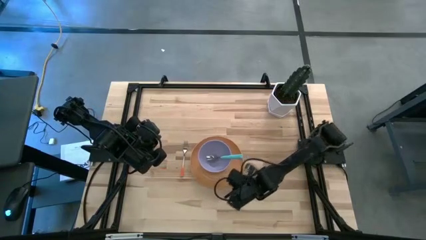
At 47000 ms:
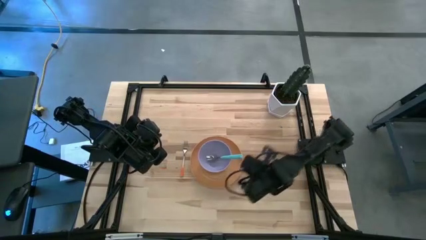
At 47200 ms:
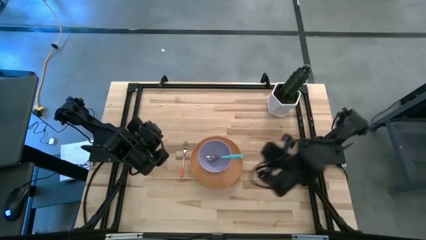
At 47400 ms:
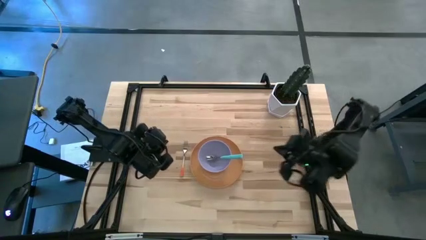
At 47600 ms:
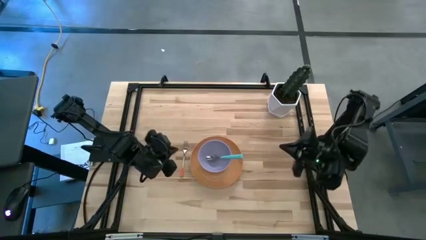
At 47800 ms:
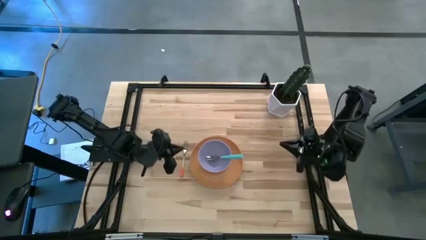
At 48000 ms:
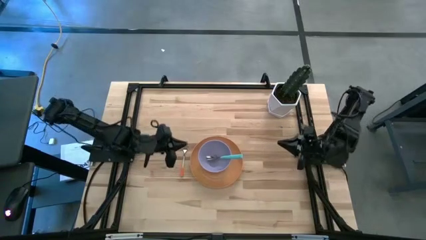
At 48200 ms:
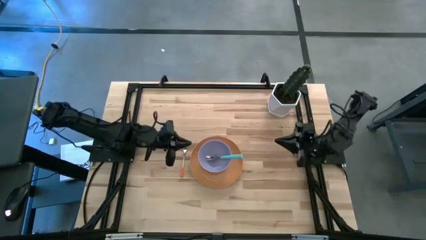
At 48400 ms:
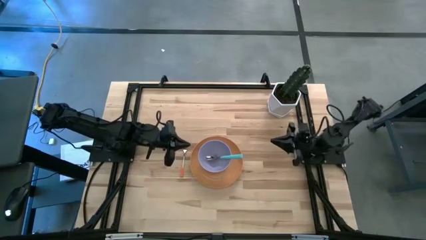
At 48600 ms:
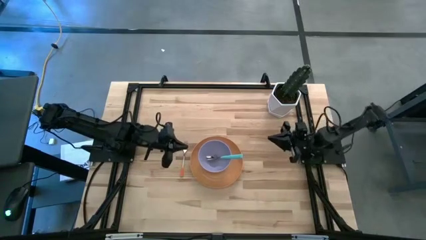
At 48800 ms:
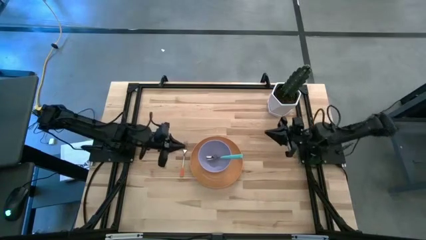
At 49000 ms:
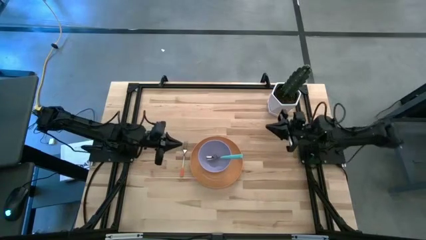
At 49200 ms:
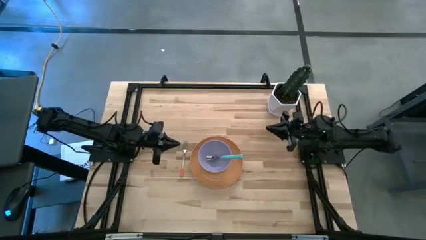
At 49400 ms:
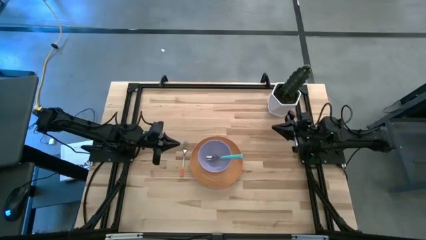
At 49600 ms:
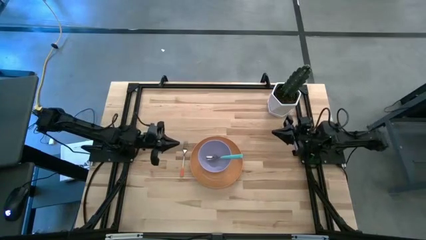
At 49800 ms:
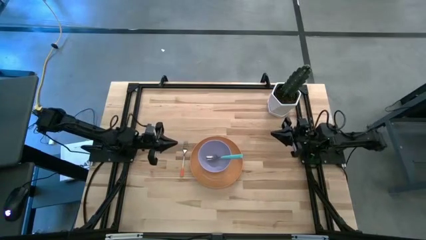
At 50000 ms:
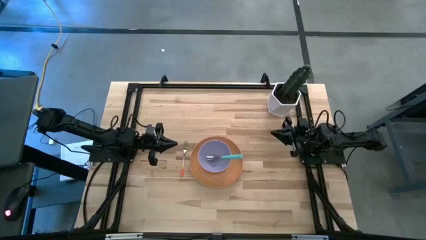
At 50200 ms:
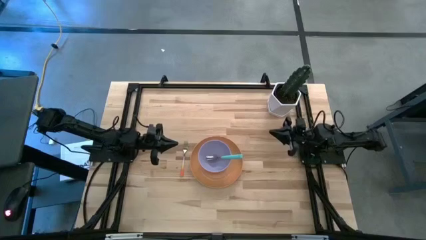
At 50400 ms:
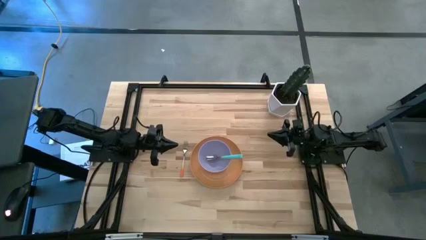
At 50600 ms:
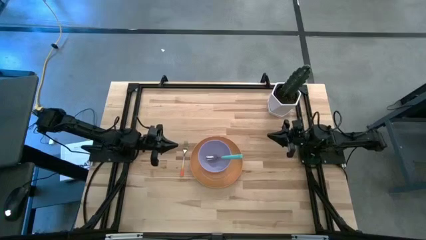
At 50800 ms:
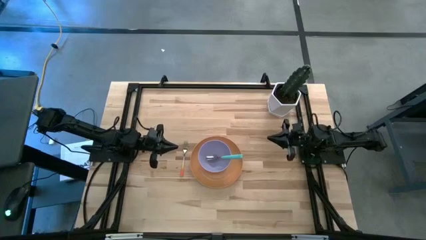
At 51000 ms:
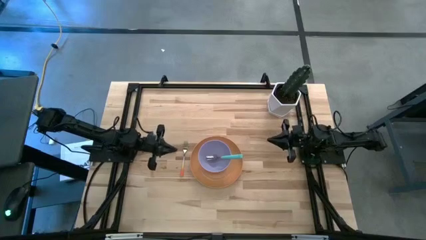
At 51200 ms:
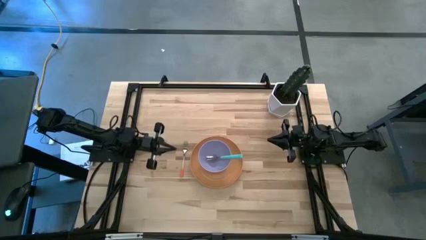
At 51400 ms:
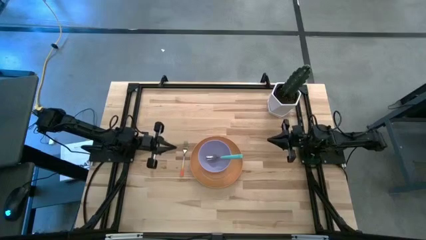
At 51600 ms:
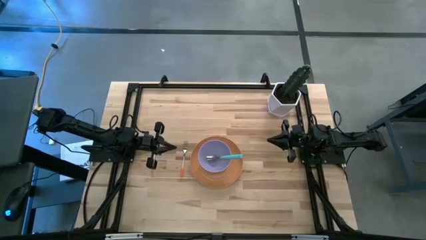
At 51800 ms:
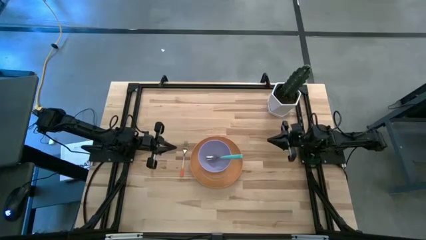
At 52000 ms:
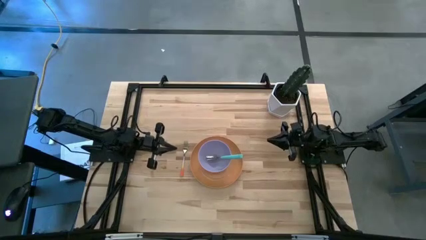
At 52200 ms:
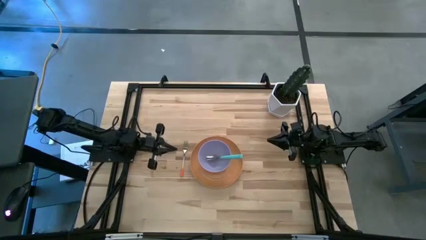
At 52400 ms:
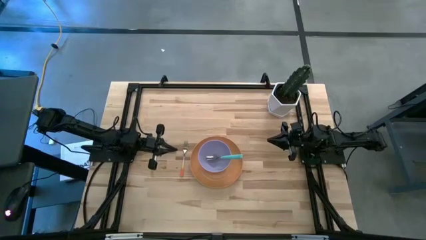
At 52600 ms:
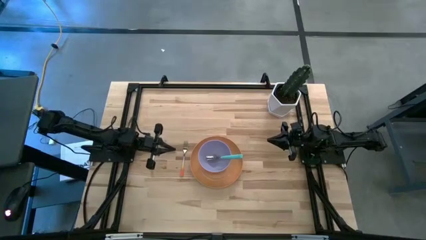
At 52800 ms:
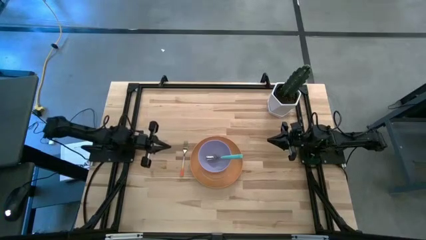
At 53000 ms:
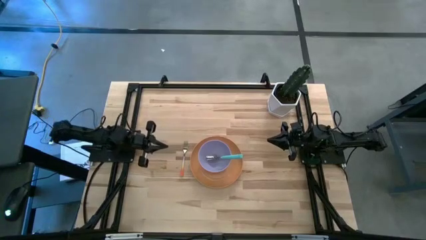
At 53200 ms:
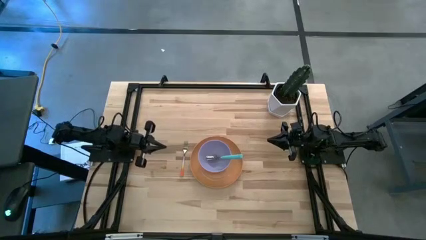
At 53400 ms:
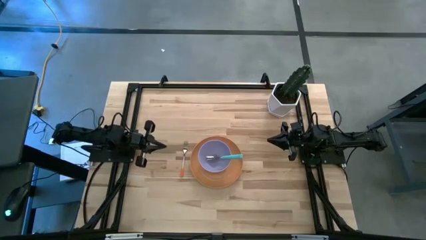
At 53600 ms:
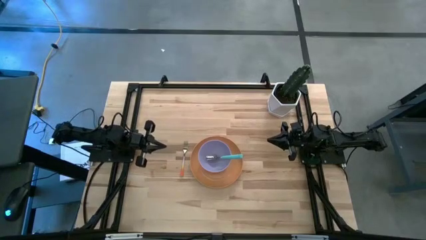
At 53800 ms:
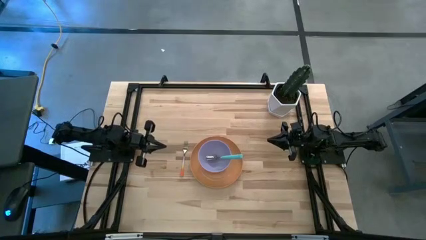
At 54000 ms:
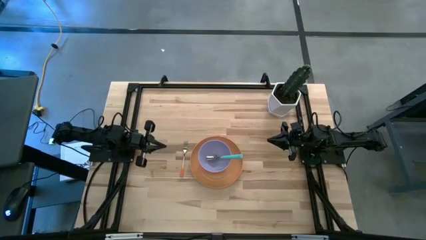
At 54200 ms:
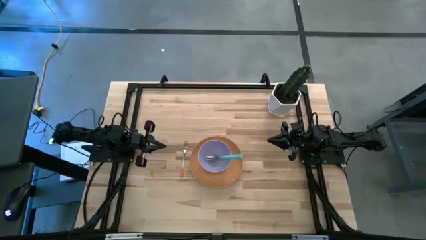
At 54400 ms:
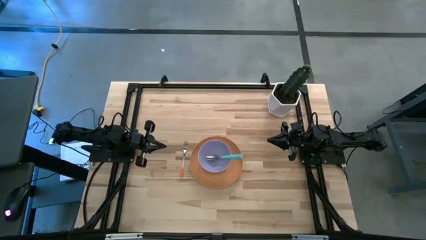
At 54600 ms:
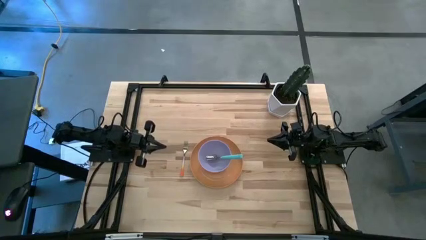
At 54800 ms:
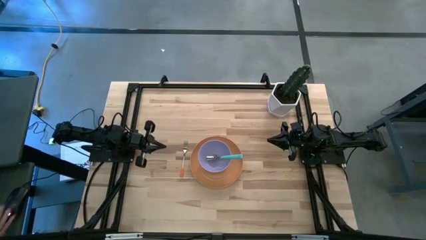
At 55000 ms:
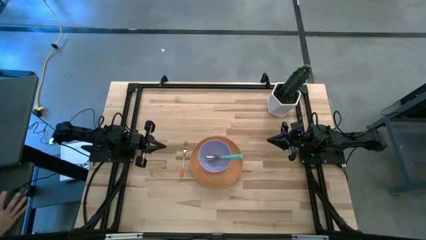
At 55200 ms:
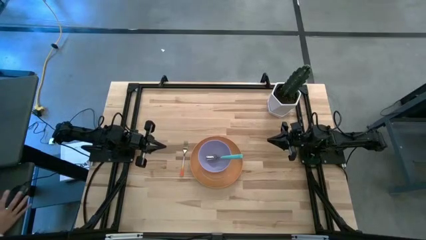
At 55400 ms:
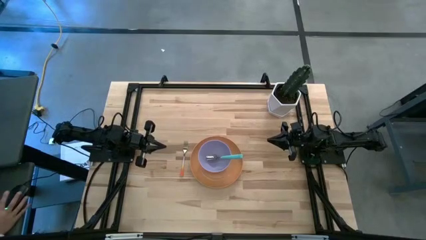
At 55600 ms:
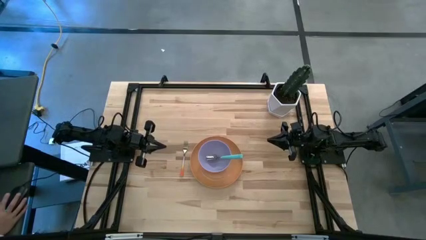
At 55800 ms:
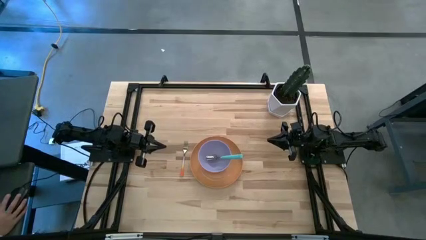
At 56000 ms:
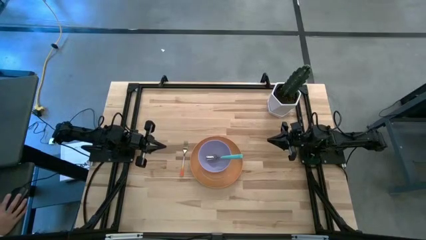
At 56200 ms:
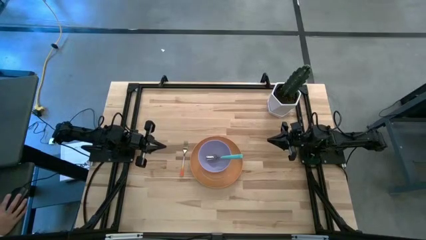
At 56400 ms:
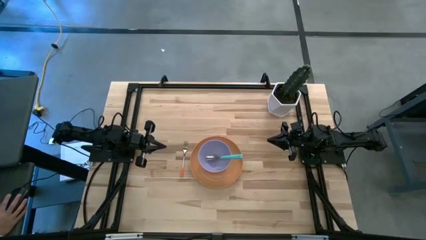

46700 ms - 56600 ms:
Task: Set table place
Return to Home Position

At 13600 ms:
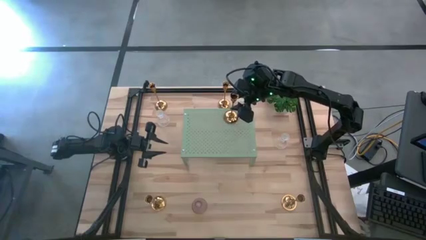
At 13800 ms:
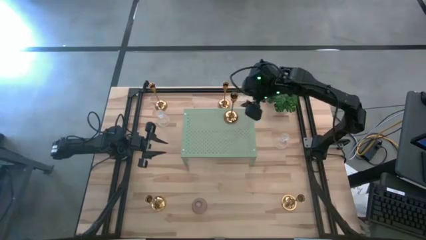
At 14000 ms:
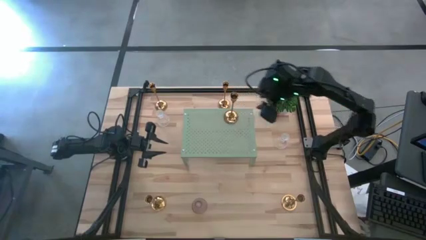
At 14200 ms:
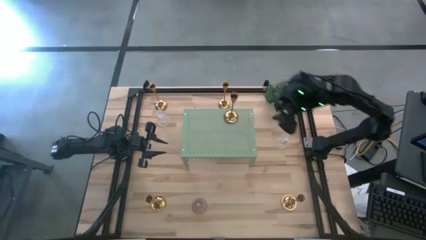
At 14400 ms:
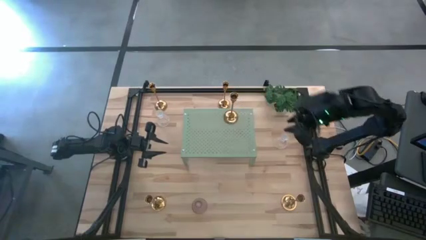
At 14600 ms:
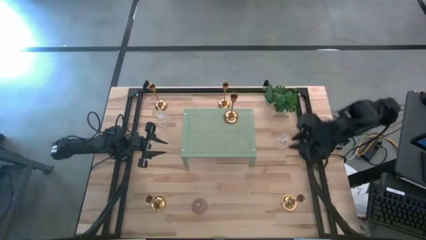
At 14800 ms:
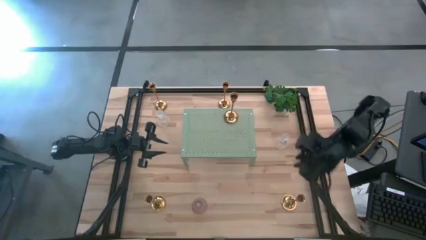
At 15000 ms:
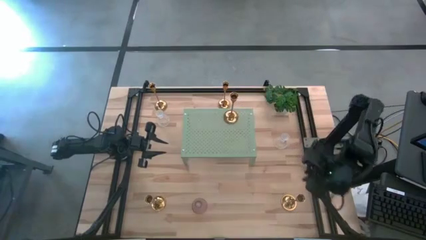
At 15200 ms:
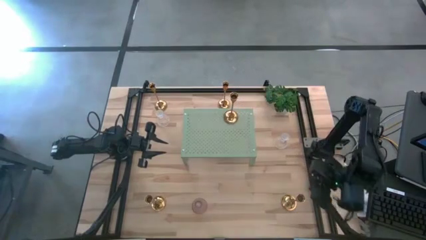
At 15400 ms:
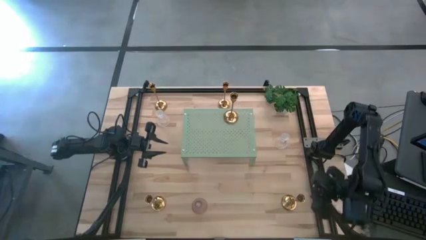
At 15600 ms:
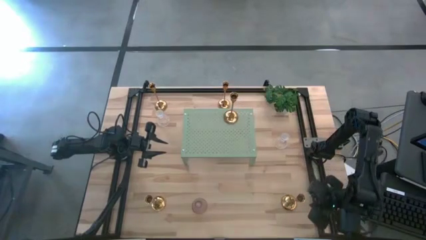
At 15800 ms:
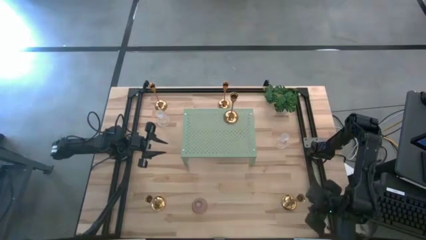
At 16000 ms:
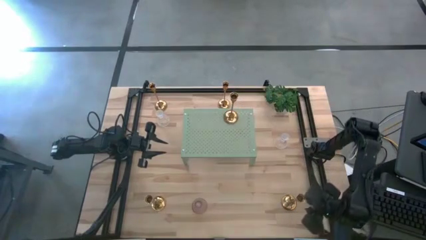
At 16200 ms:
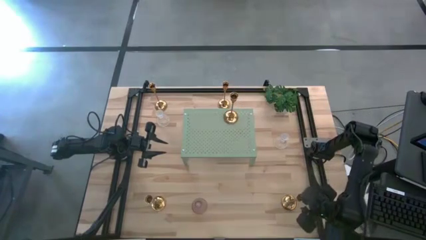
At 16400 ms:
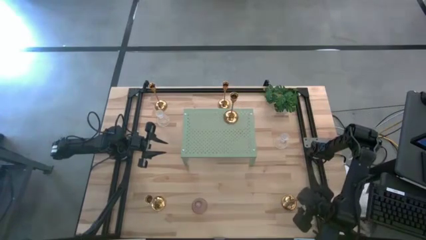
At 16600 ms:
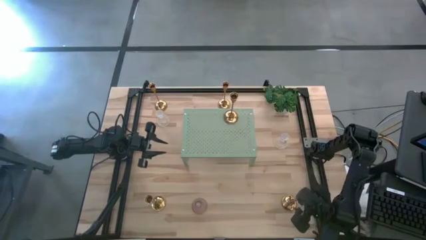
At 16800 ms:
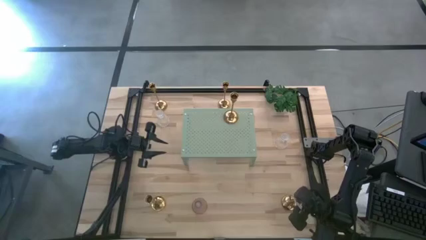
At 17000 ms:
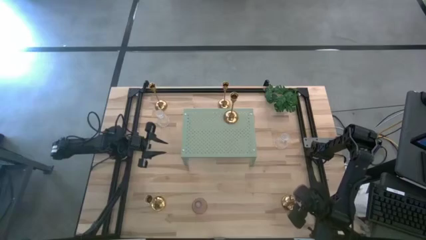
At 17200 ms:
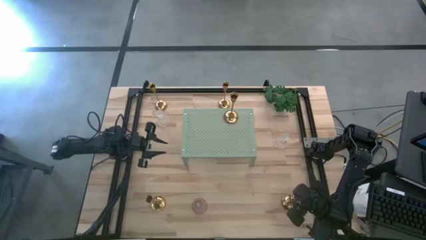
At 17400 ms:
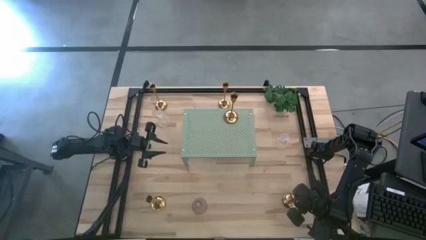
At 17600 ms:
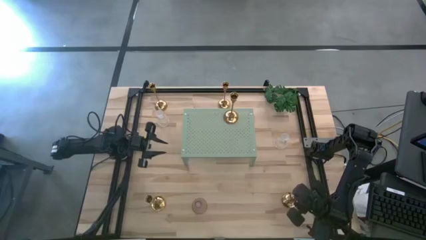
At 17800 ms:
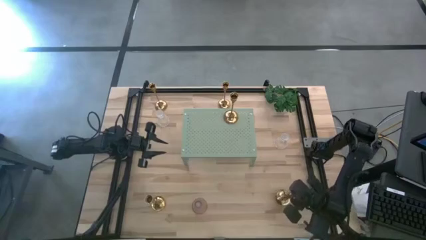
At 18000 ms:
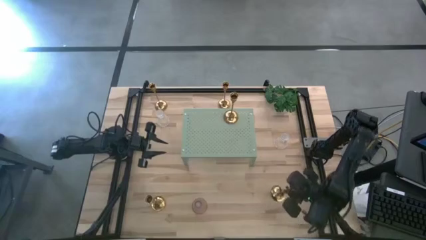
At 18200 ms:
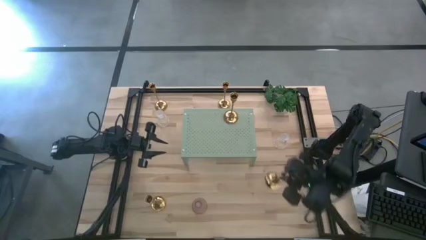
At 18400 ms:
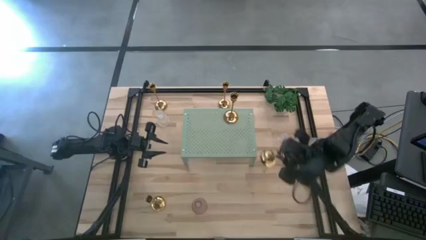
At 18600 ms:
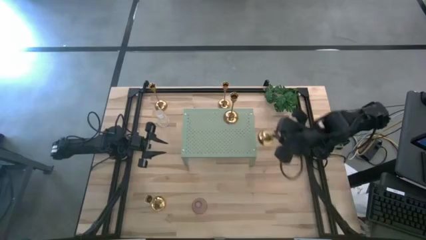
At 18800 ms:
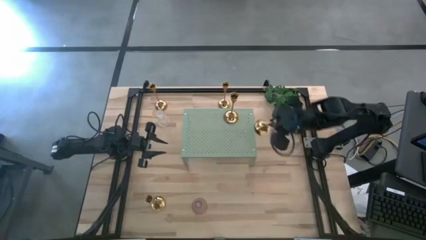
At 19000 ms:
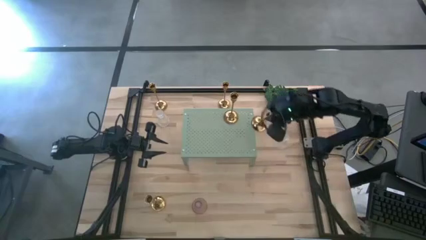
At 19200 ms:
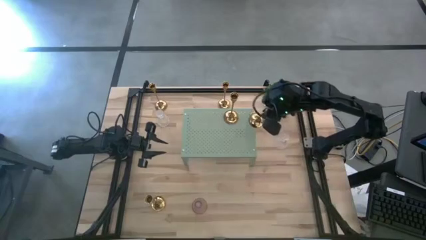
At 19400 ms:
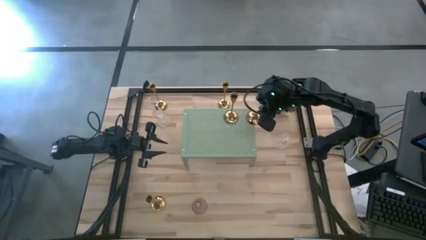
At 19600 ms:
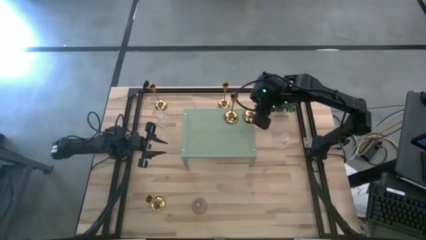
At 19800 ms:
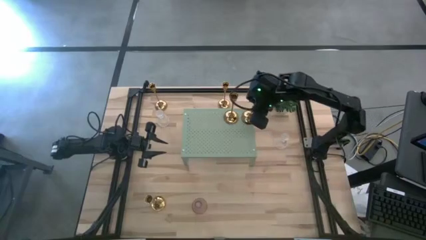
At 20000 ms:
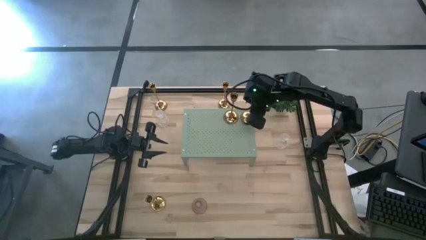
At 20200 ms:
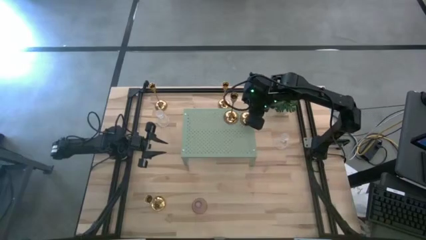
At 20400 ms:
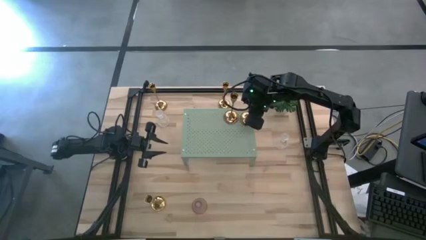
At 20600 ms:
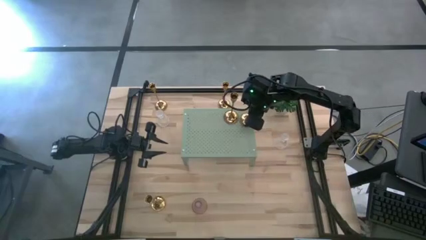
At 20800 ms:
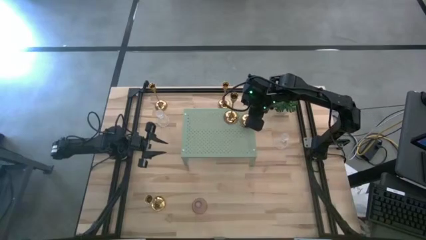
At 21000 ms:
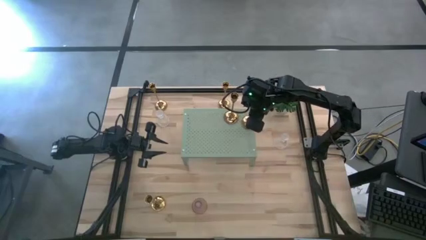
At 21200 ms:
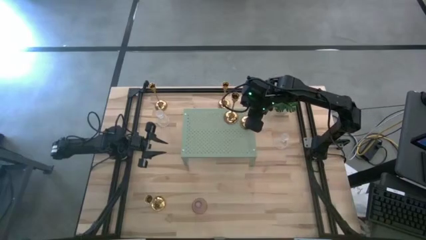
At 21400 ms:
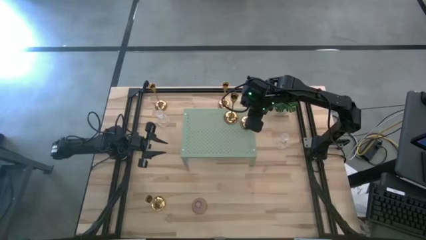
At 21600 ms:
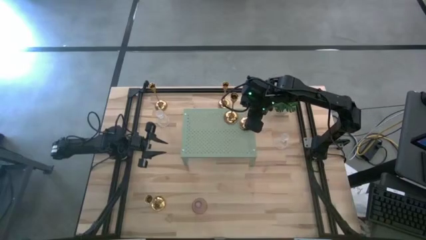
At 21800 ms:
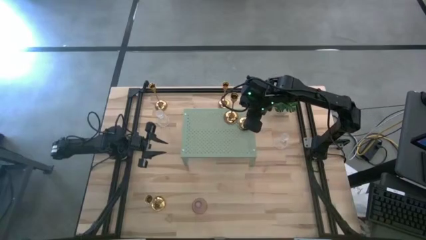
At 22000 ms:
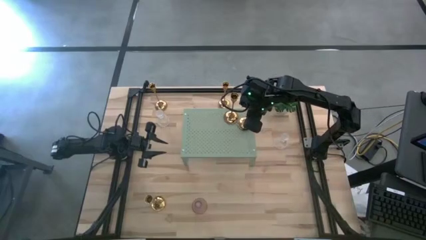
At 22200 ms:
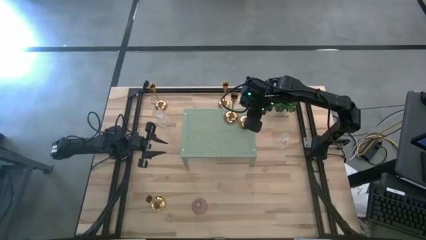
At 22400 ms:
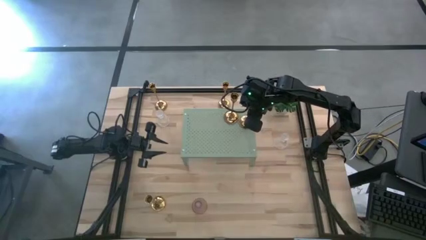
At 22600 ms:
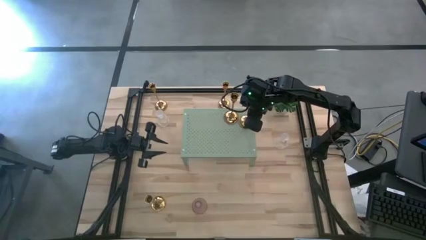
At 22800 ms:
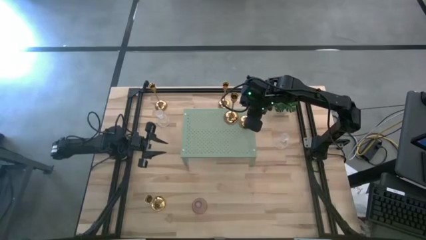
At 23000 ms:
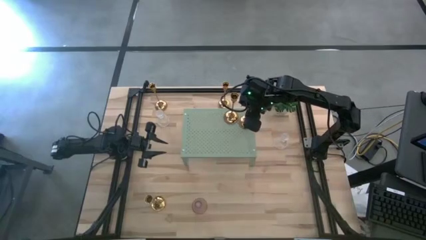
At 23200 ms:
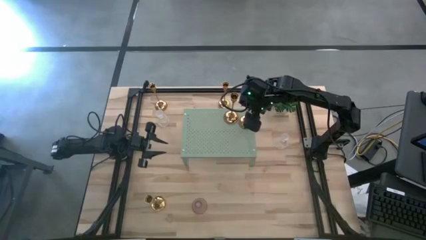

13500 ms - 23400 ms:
Task: Pick & Place candle stick holders
Put the gold candle stand on the shelf
